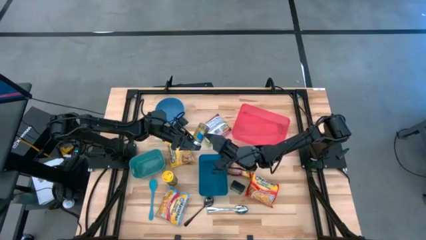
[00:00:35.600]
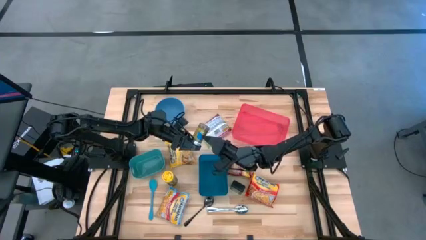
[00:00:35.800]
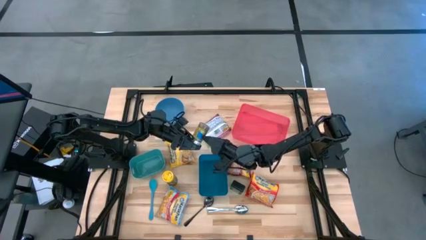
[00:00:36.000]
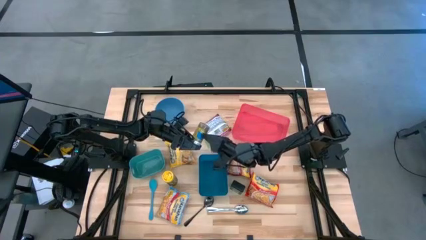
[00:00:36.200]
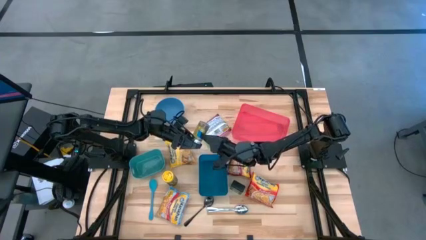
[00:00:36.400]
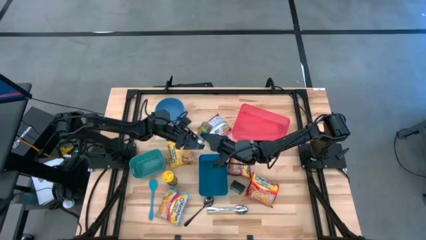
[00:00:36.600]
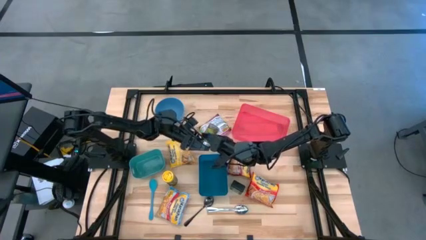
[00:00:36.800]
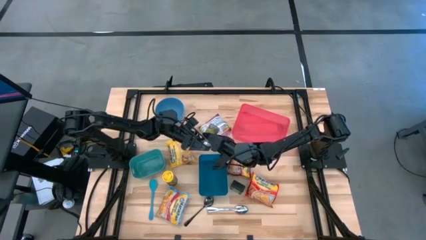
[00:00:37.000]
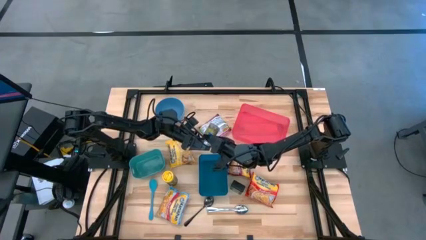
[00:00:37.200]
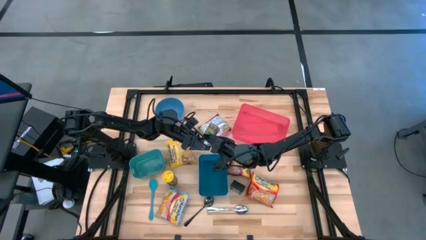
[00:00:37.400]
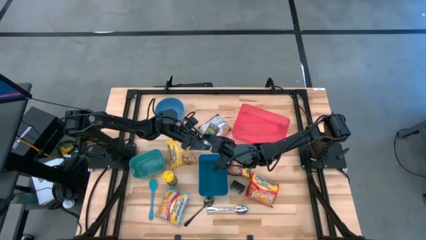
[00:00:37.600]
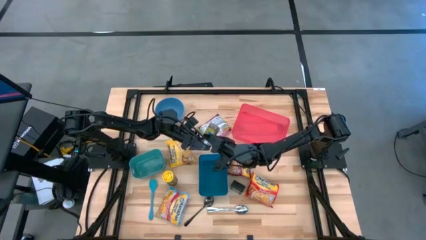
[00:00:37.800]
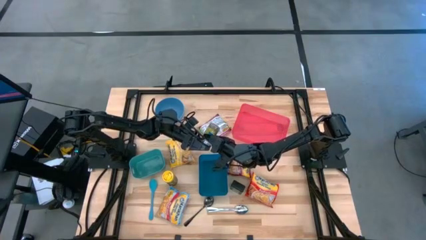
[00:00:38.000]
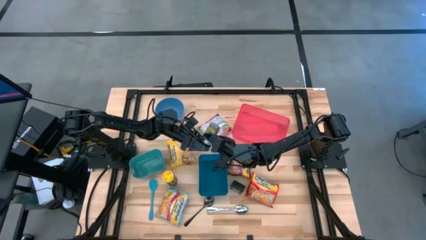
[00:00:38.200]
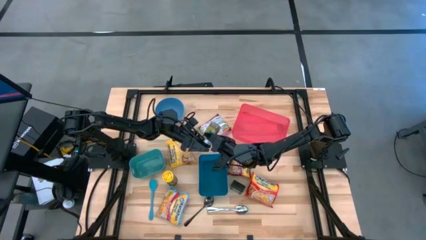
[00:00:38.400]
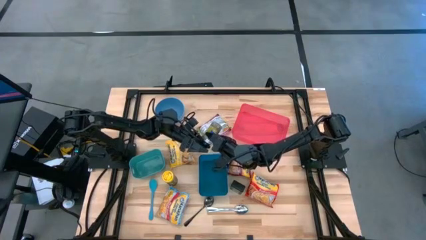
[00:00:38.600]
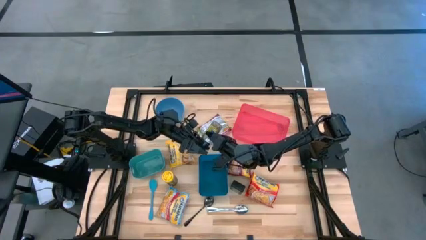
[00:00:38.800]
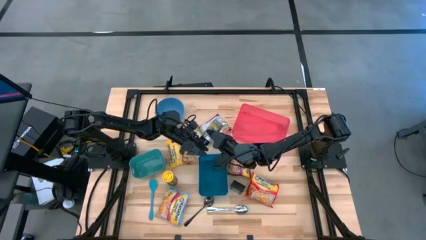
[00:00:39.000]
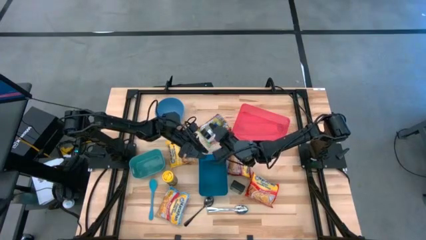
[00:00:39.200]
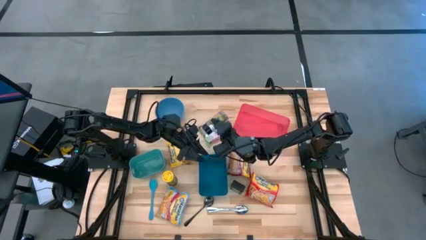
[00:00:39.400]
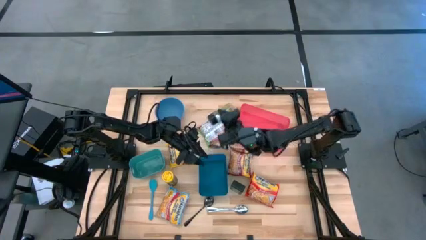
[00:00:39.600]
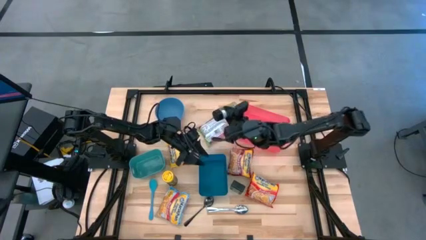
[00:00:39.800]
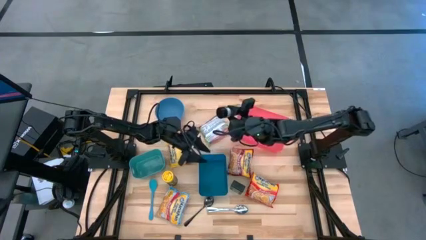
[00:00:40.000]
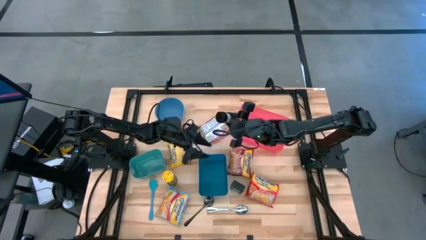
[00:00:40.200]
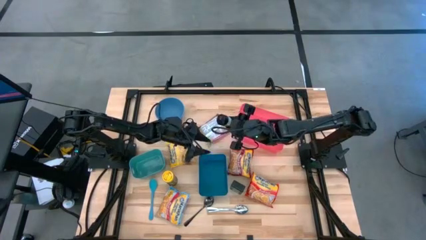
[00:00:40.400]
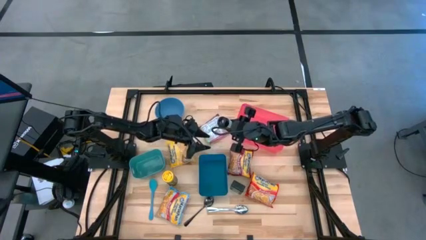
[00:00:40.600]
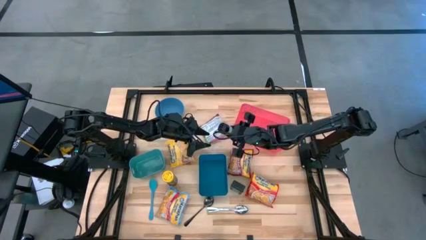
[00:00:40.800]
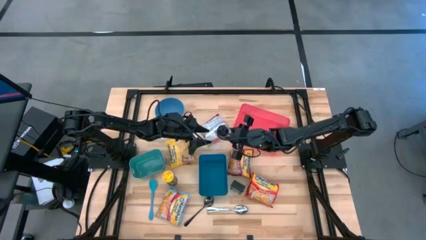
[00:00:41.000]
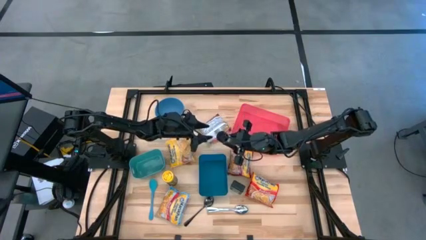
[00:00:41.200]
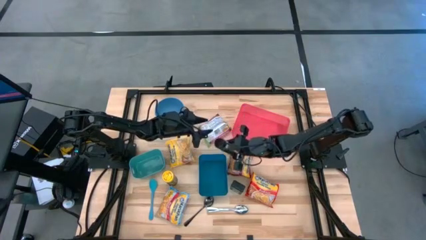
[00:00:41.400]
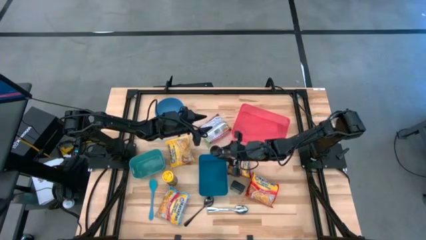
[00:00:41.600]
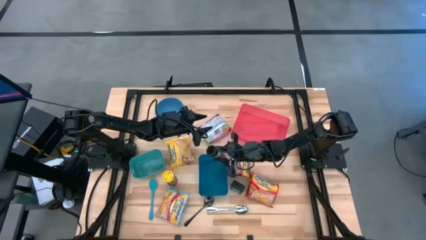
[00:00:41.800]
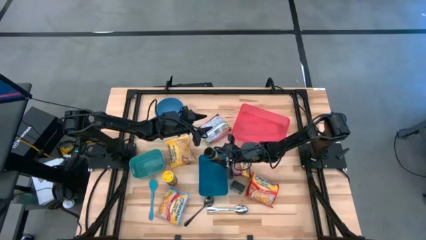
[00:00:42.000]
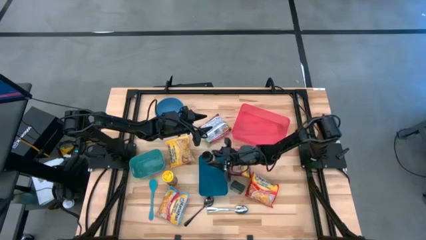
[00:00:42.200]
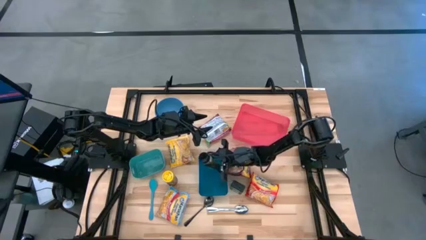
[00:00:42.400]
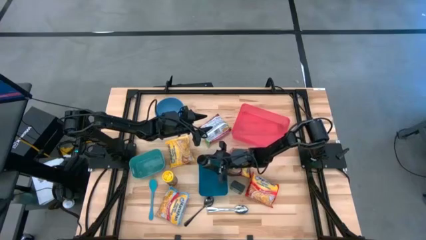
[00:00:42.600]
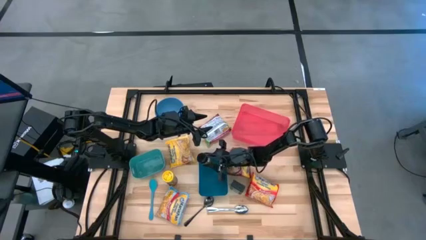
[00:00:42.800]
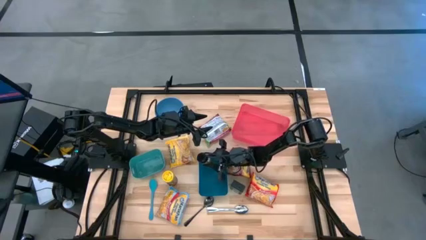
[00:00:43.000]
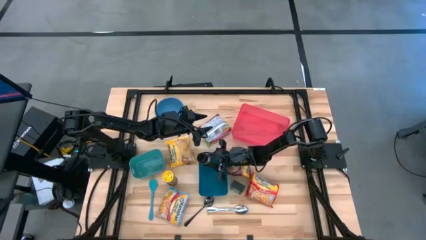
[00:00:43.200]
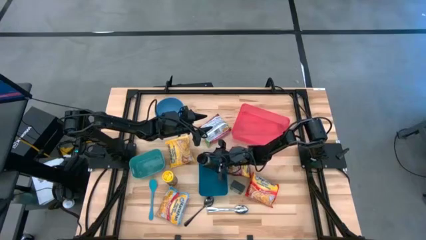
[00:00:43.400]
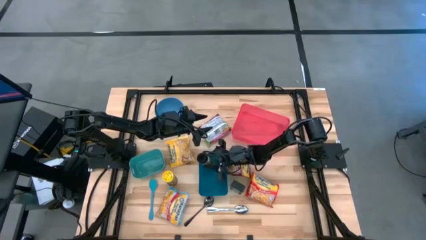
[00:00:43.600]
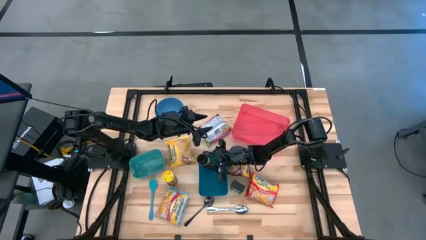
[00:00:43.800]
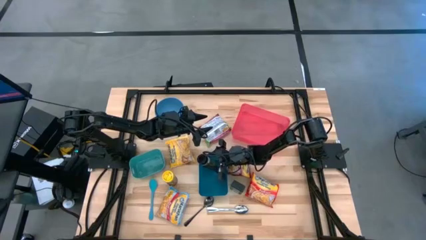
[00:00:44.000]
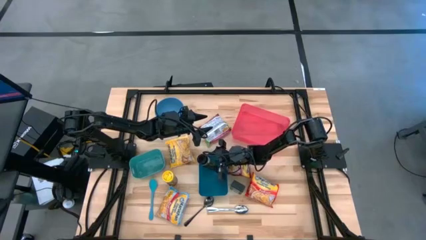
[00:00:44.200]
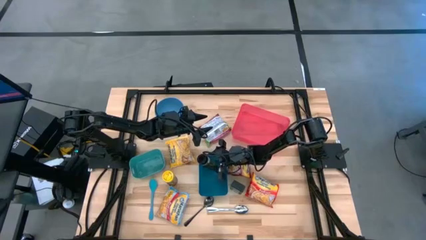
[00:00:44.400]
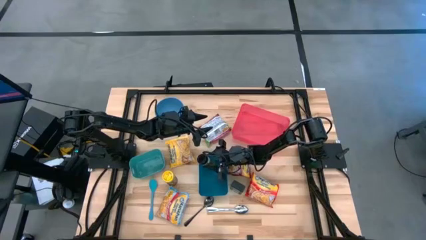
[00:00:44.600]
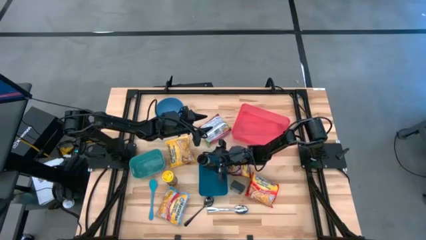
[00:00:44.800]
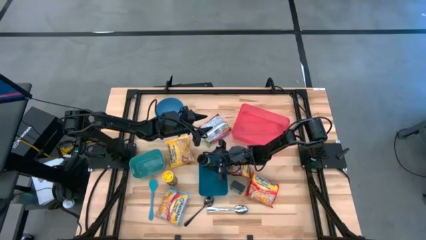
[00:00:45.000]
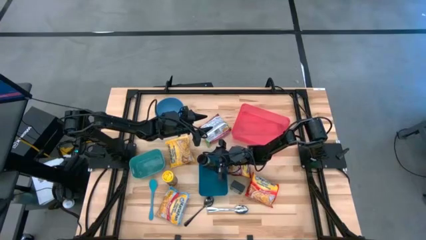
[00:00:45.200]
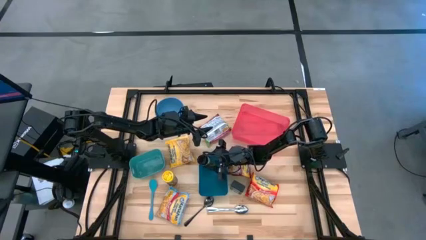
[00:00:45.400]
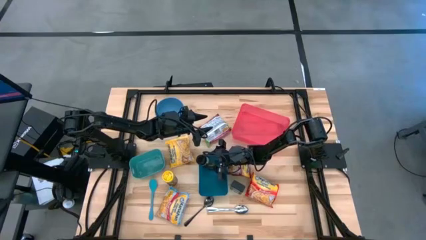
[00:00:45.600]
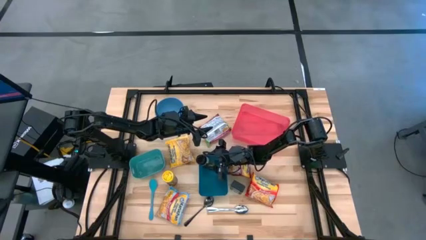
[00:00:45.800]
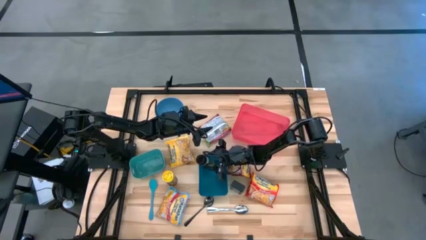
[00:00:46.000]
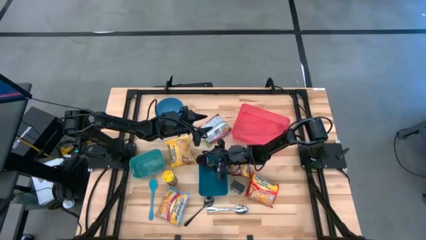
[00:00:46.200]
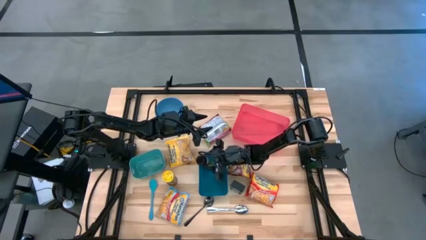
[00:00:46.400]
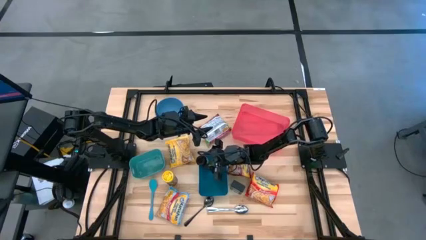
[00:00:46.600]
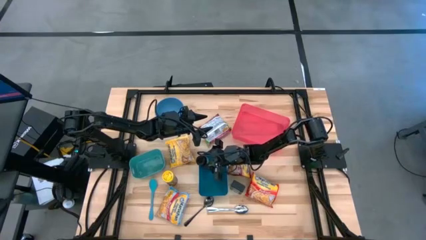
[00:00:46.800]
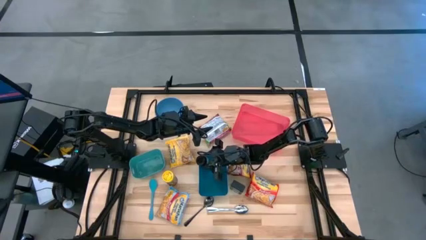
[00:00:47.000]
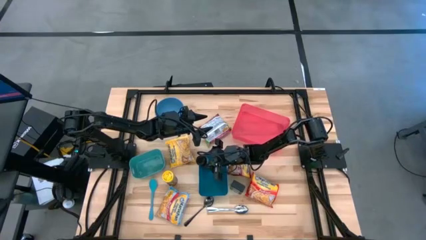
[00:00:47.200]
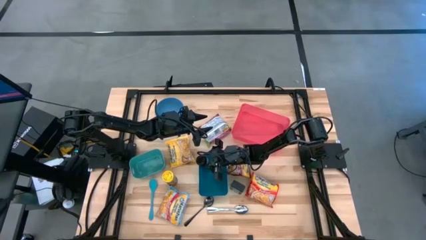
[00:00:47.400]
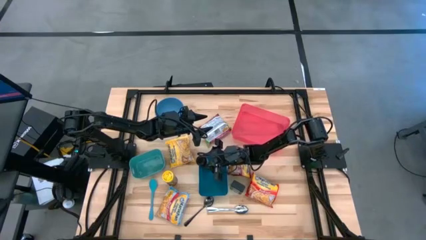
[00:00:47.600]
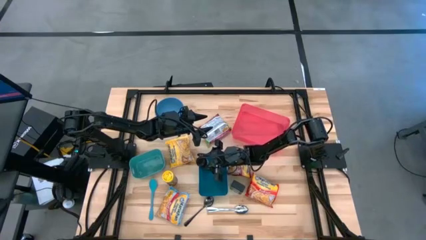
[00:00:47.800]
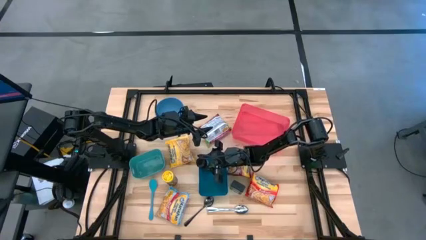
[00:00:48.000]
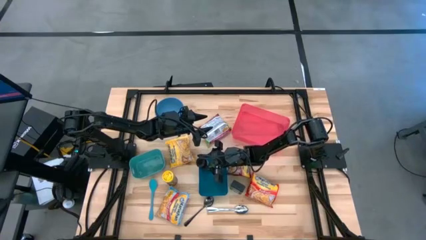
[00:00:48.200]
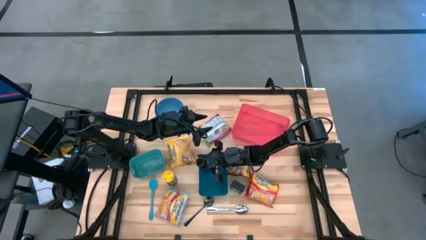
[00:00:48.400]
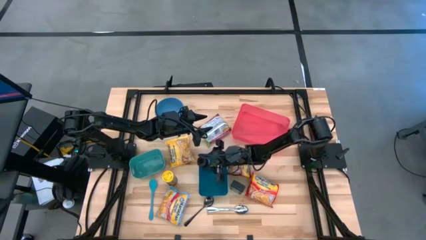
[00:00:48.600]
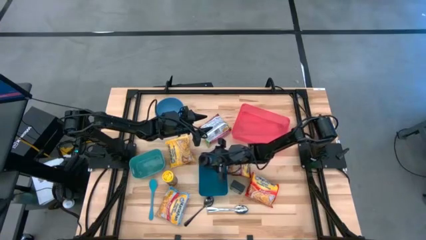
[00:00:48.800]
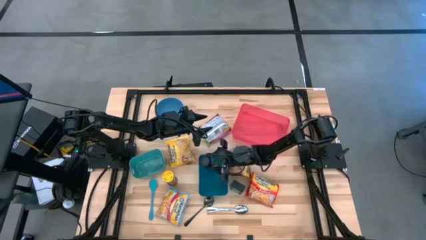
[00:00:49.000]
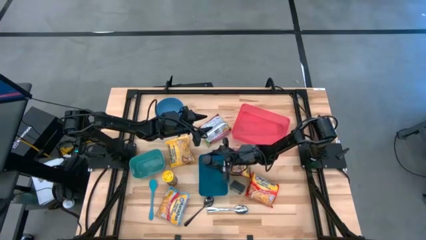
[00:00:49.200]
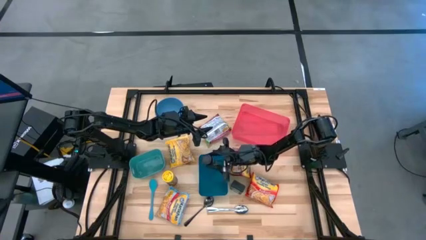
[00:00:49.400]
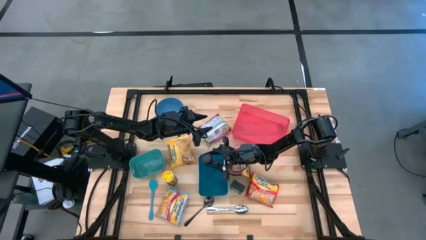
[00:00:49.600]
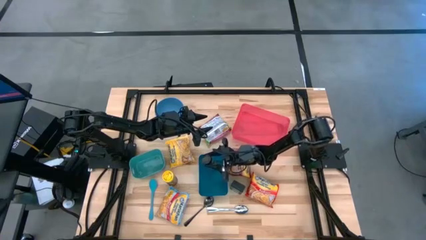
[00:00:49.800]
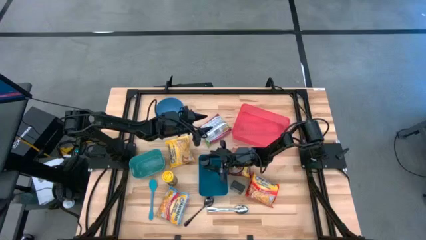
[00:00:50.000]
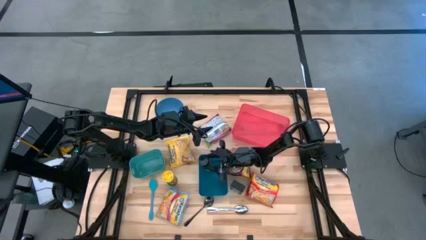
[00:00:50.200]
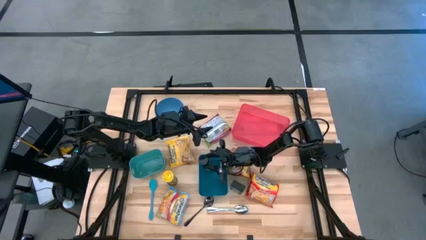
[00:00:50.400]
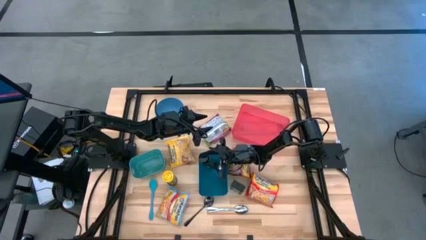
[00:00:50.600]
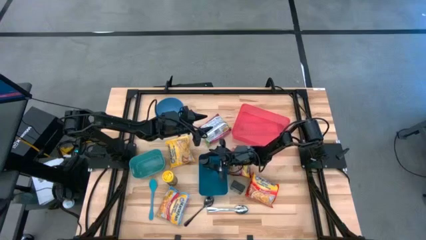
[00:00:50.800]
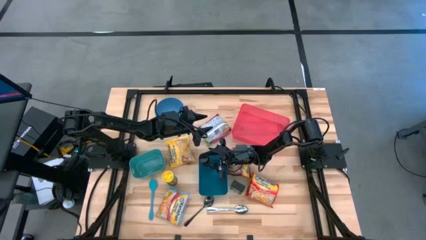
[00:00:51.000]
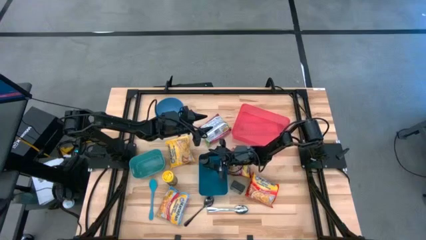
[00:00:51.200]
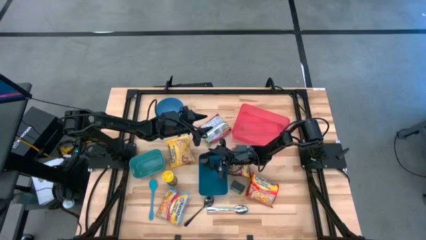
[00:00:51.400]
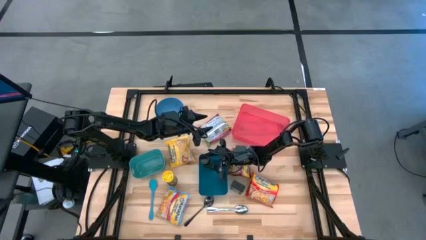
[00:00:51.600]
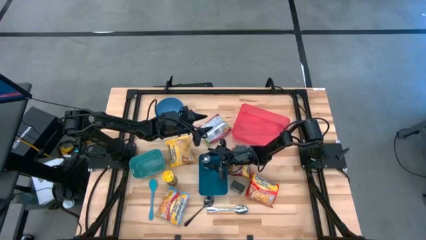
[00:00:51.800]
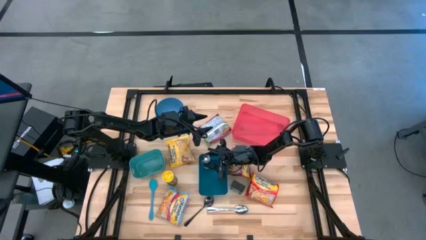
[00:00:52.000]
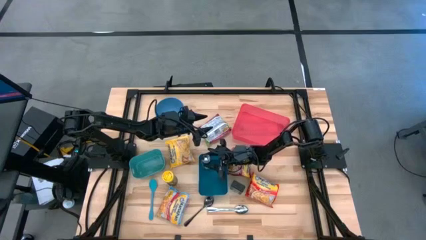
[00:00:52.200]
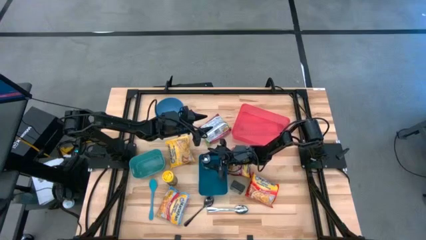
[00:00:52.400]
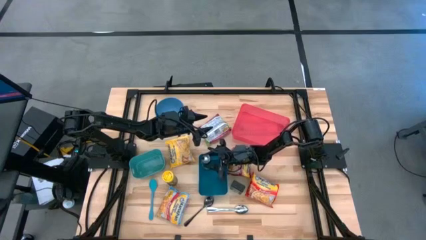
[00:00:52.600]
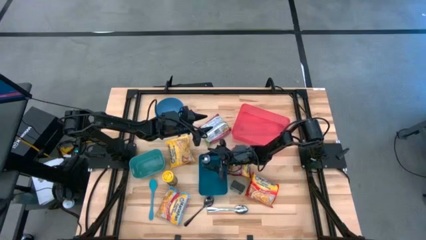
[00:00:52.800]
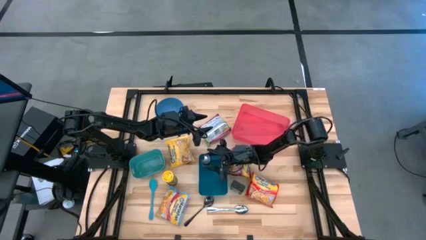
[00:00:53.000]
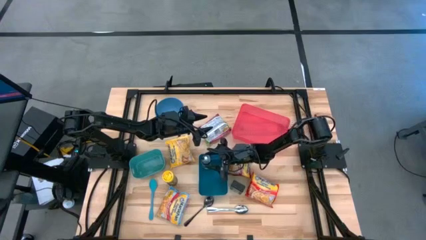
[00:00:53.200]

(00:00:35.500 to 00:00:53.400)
Task: Pick & Place Food Item
Put the green seasoning bottle into the blue bin
